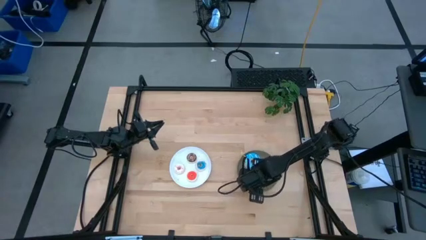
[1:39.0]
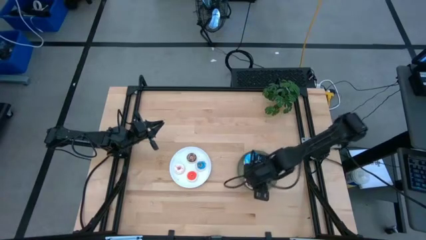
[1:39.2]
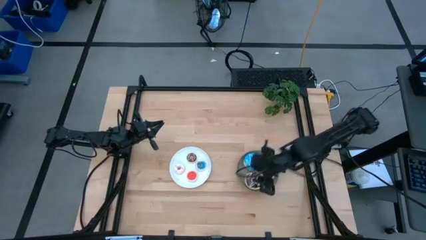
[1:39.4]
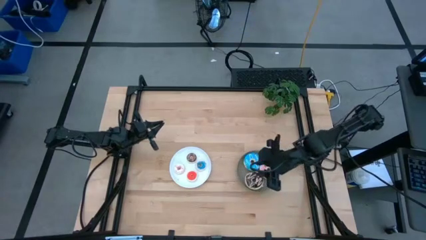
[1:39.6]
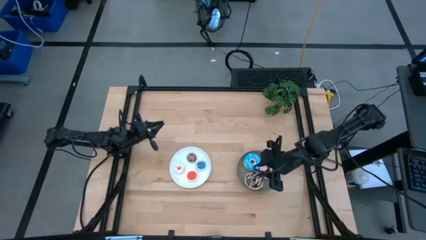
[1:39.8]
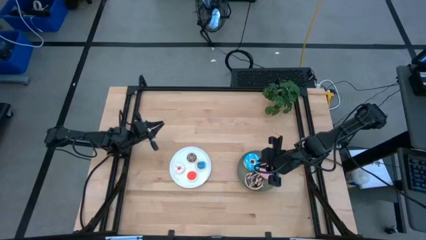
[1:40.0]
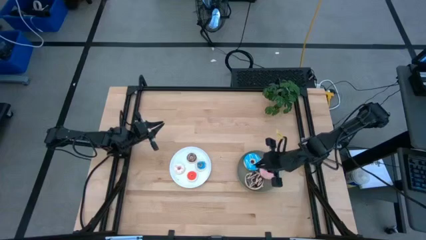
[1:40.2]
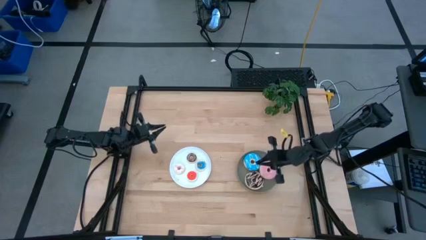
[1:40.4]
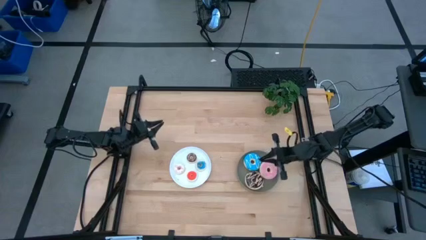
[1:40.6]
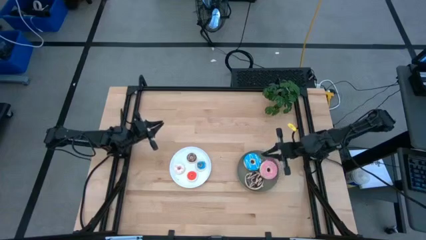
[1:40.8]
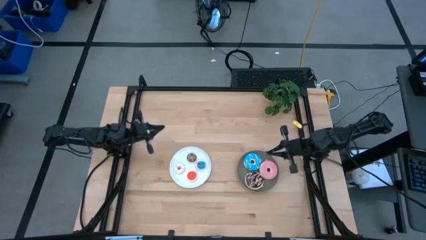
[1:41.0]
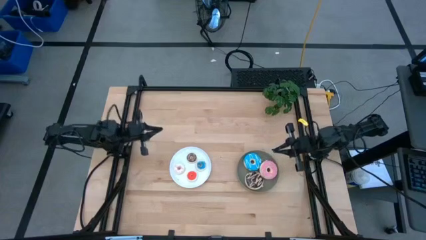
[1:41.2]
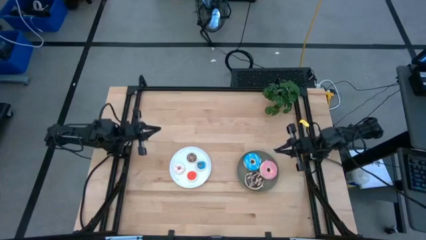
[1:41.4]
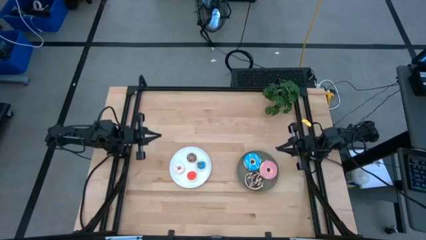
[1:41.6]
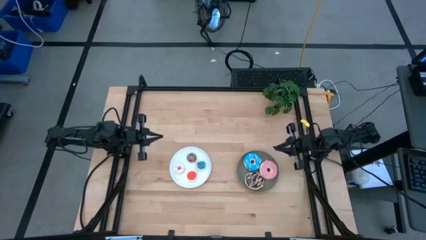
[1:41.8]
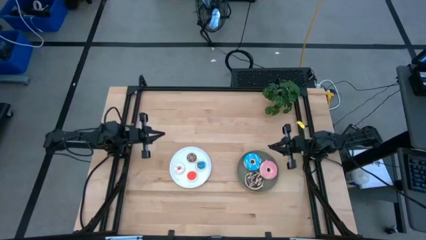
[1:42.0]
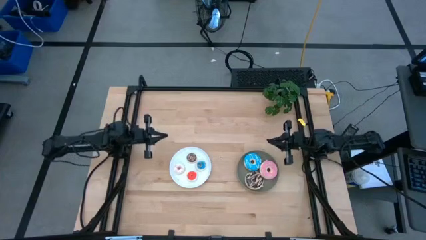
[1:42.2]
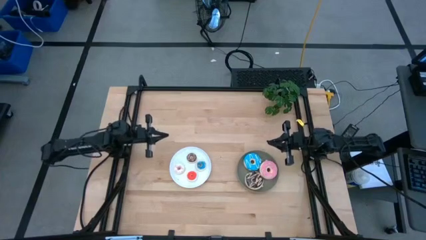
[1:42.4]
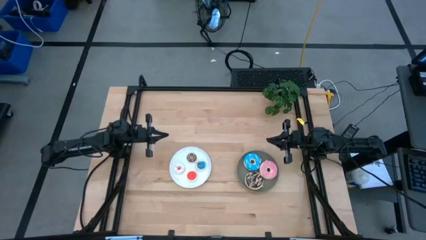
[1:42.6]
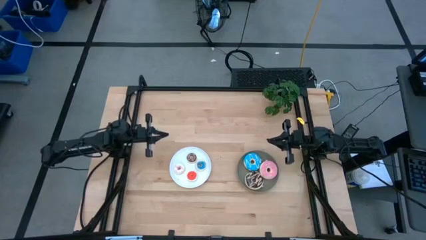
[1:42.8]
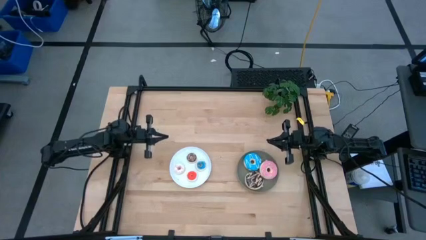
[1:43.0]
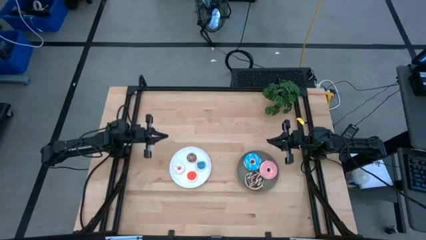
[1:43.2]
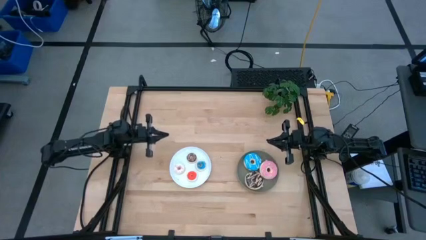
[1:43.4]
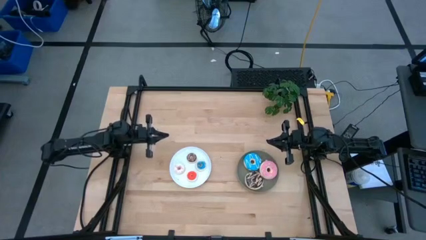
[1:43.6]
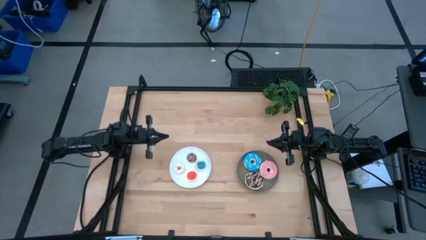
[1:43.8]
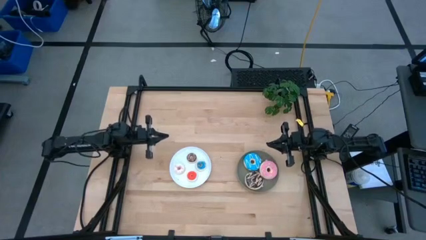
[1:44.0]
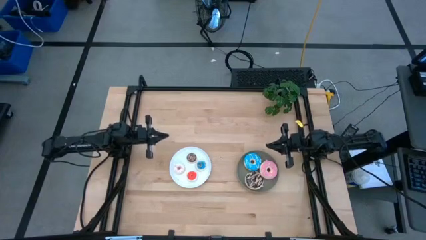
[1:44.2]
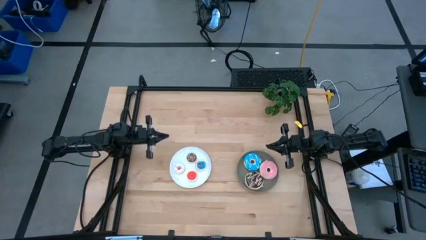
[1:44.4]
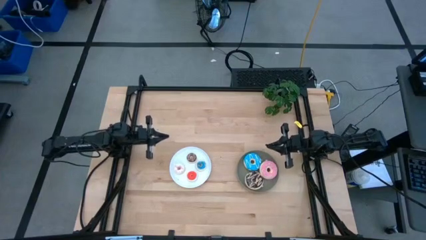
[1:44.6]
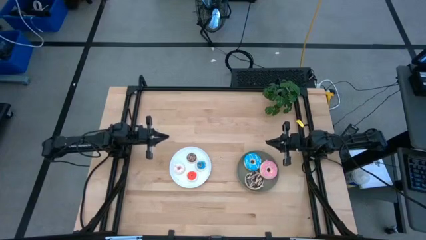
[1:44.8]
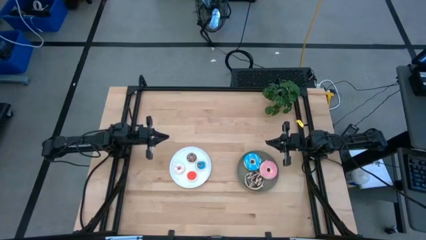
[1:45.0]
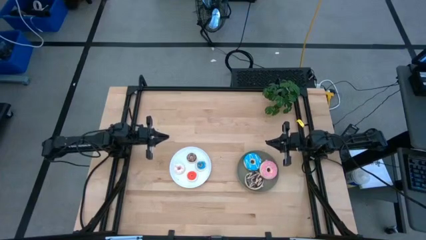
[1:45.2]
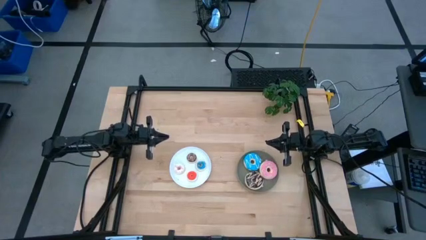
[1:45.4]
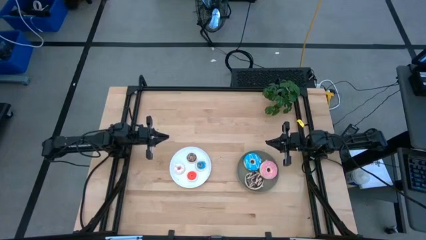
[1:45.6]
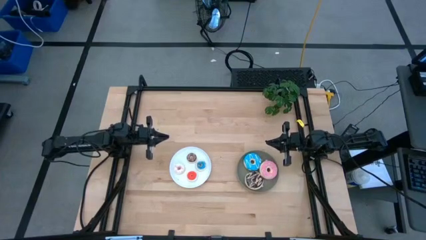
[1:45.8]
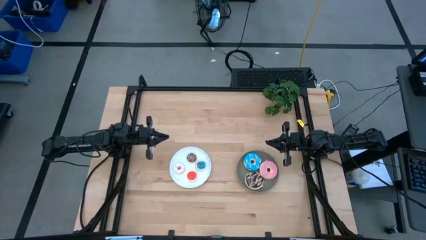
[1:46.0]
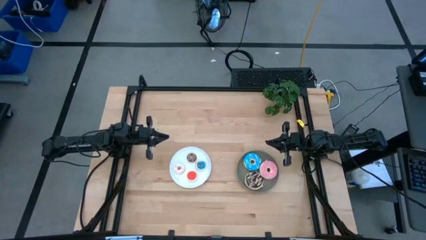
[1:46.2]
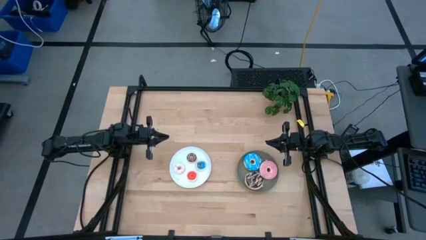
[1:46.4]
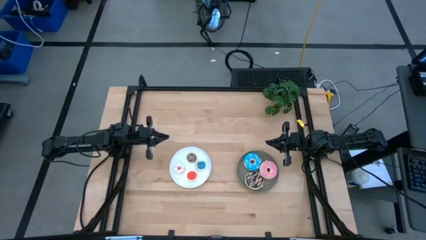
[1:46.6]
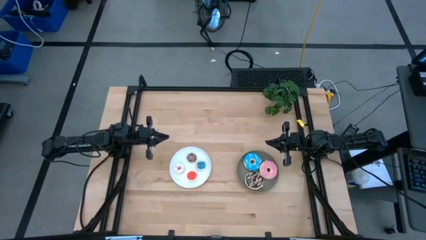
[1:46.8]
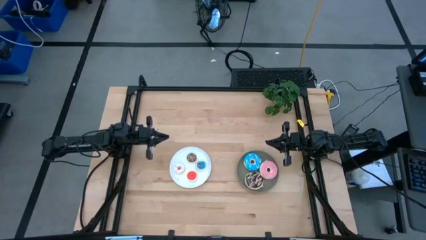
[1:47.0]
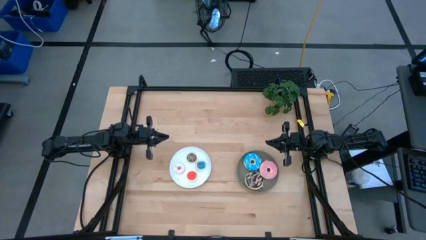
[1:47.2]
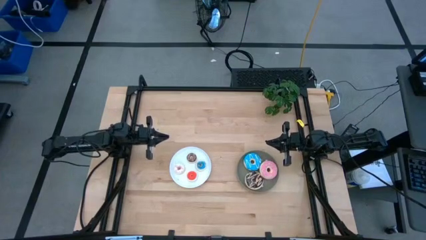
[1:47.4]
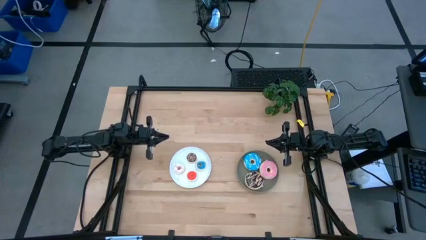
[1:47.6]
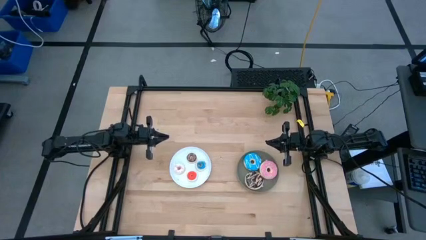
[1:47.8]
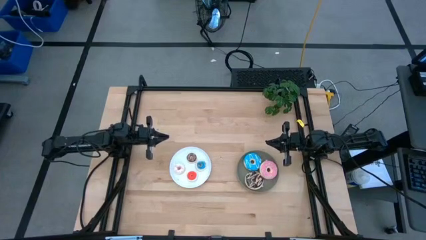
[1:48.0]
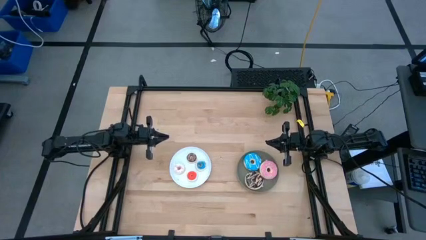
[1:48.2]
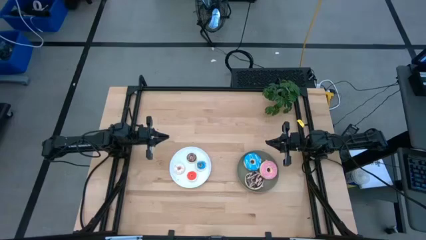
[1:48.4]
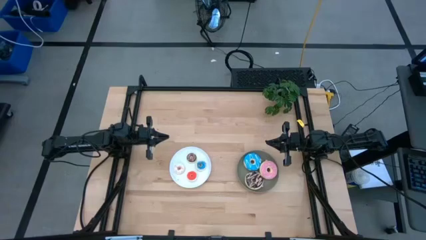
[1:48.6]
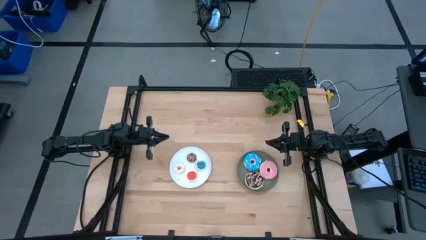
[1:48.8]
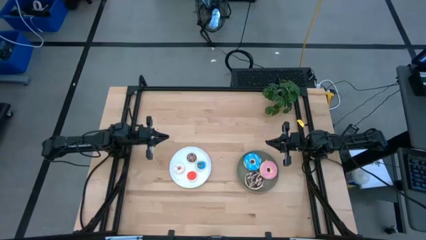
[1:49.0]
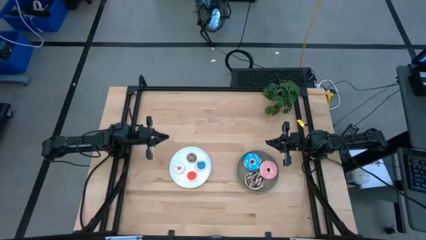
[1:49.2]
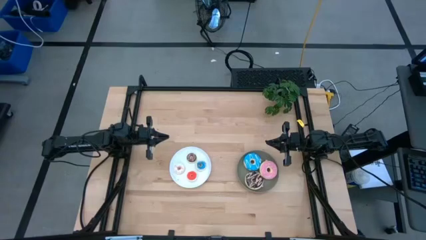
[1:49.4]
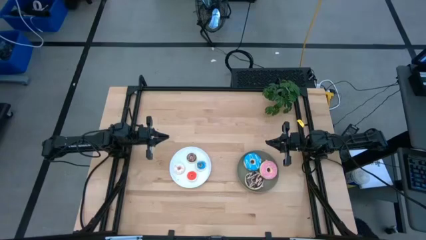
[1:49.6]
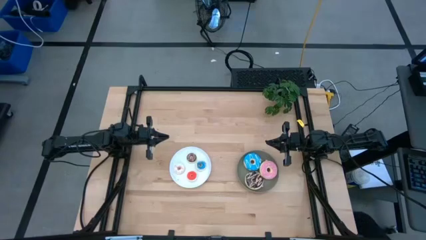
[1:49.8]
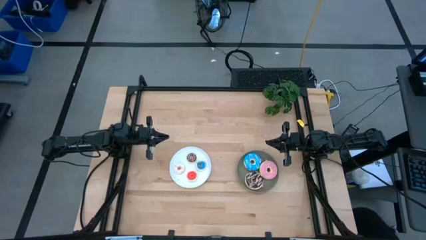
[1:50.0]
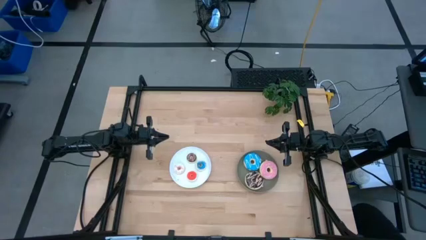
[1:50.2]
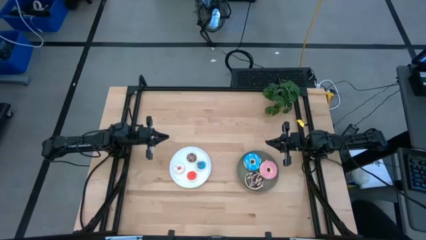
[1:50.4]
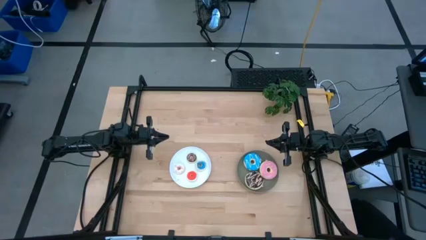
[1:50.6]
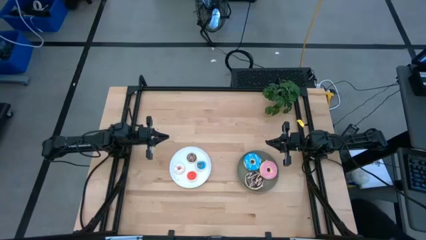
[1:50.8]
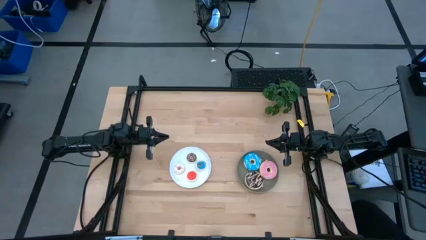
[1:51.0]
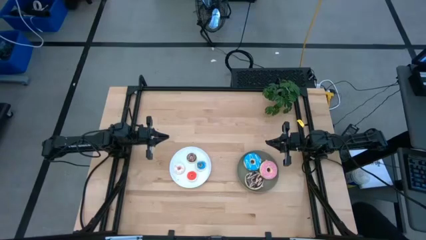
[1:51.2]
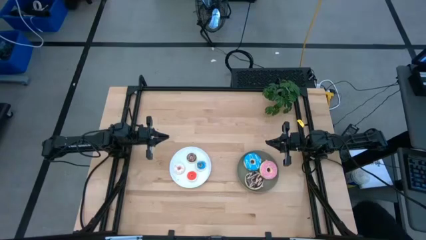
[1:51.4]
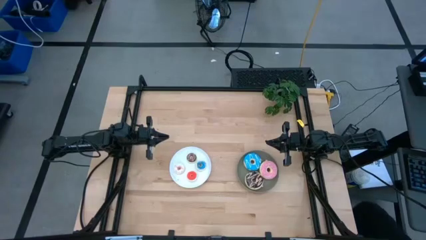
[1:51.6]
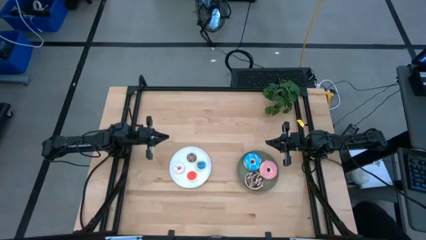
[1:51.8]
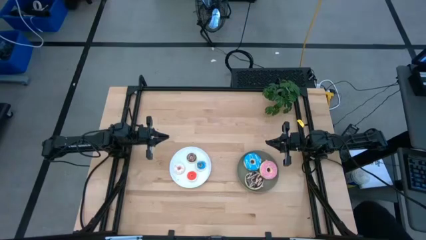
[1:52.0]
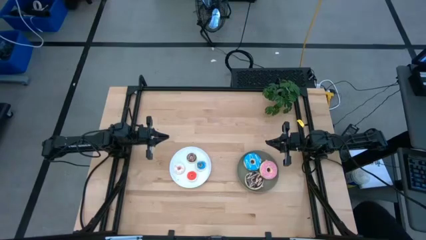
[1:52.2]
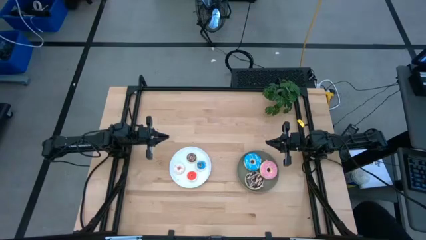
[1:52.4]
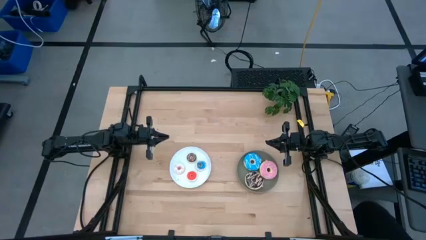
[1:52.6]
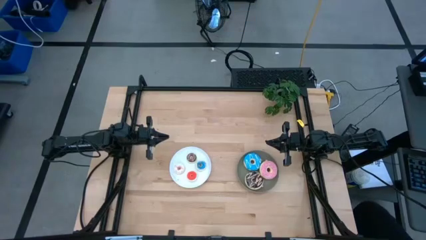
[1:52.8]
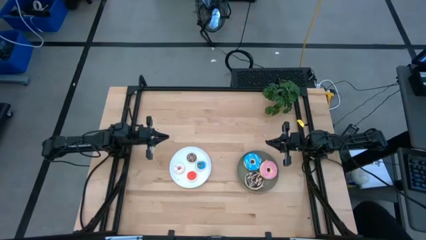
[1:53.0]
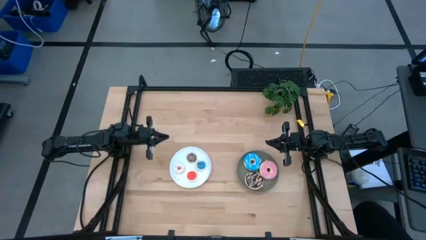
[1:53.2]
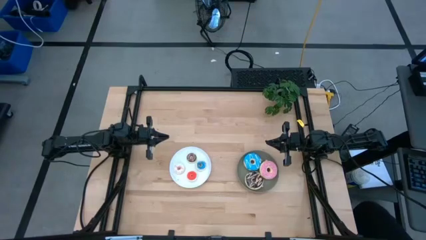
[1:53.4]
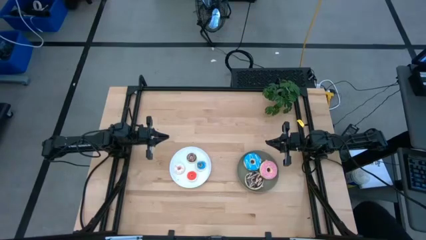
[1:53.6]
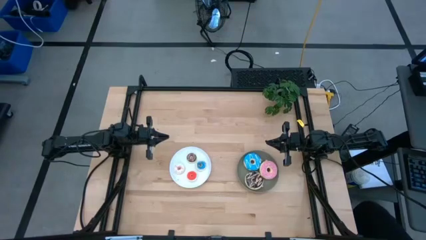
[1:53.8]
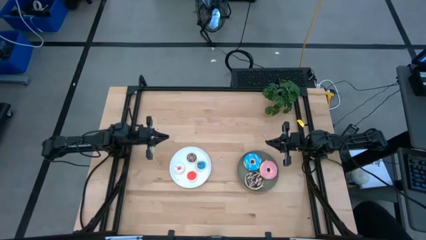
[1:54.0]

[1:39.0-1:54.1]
Task: Pick & Place donuts
Return to Home Position

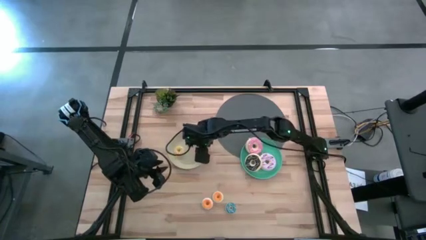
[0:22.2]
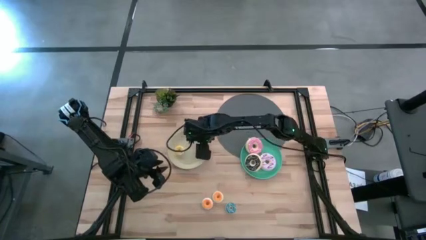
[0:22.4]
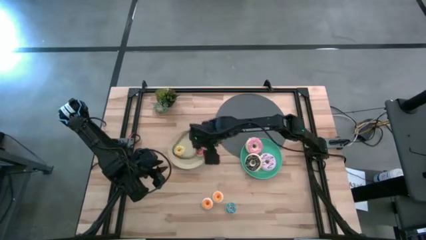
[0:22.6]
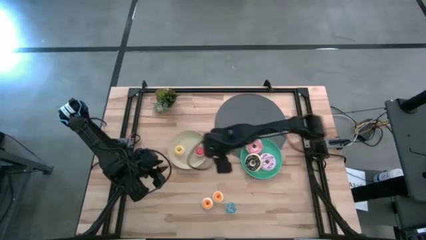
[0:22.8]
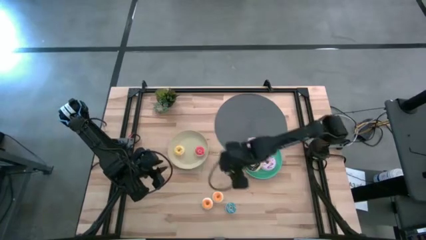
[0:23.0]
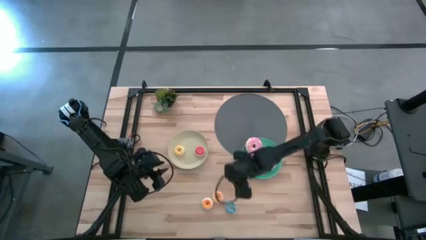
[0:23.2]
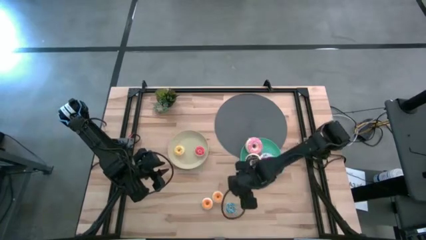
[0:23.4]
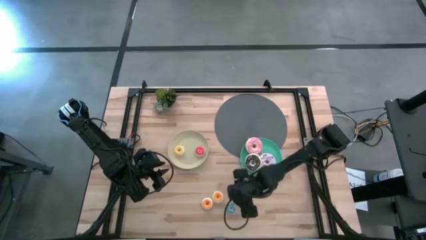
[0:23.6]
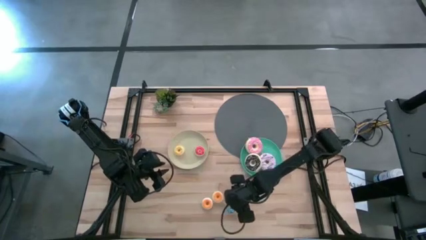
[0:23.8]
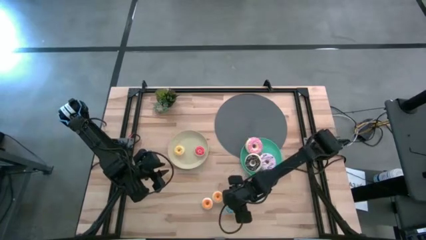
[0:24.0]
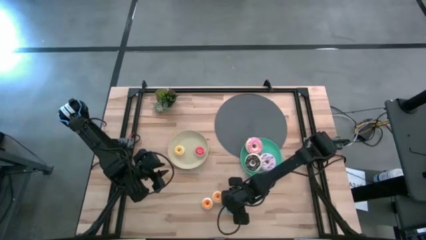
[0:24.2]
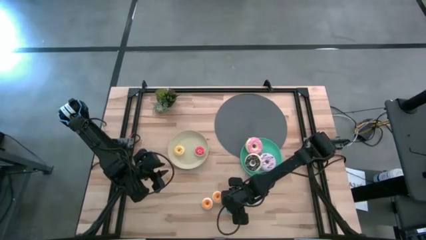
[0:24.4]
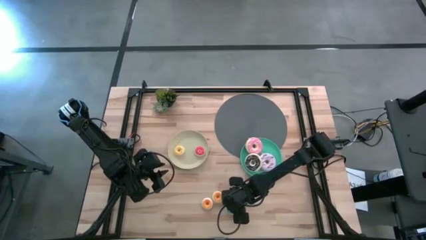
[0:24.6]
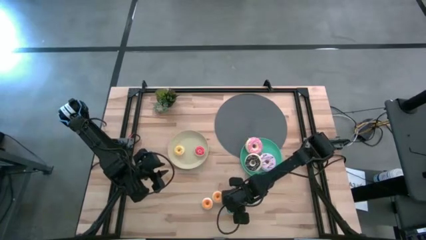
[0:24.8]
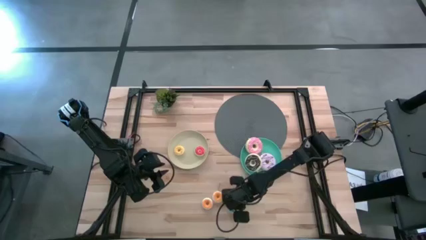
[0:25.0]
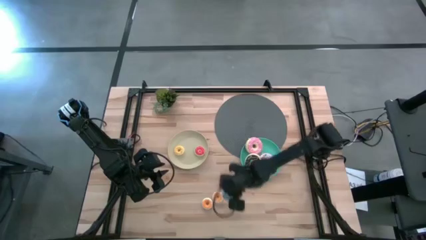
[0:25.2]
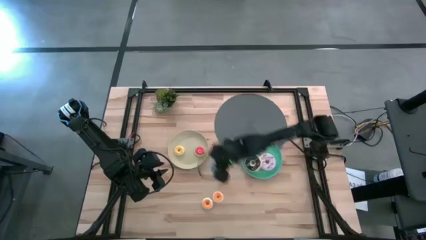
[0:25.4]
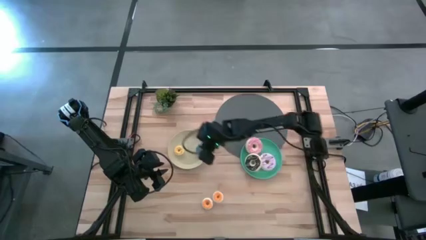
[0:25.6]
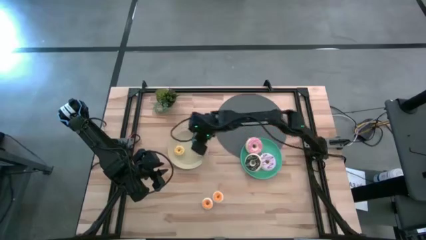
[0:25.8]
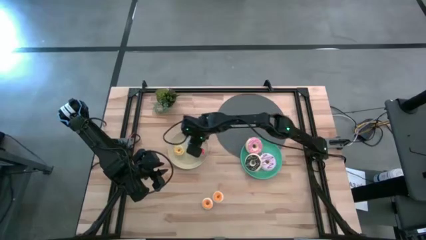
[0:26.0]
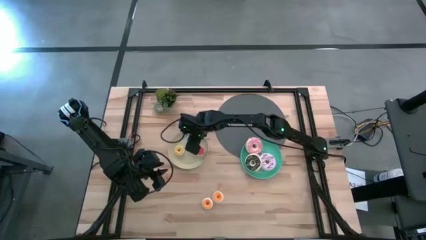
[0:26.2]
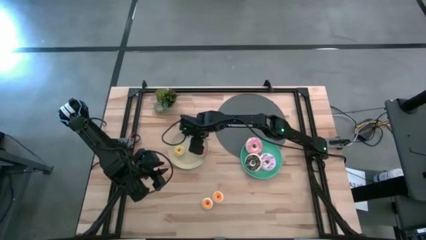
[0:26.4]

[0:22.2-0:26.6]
Task: Pick & Place donuts
Put the small blue donut on the light brown plate
